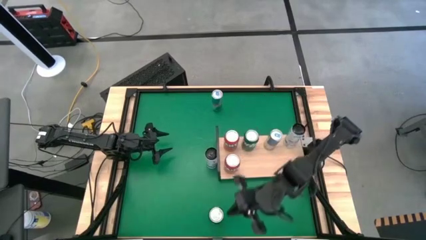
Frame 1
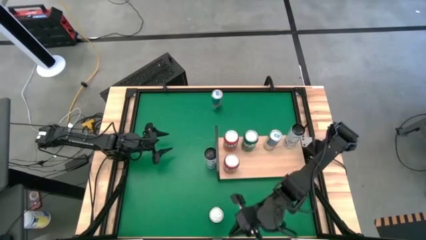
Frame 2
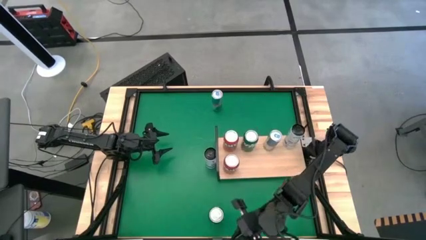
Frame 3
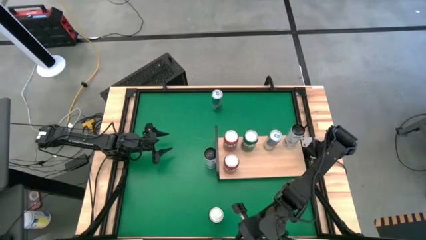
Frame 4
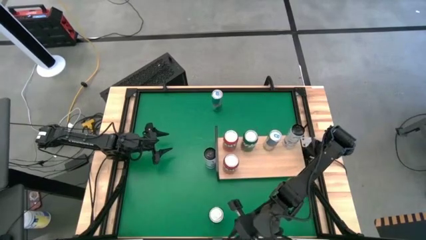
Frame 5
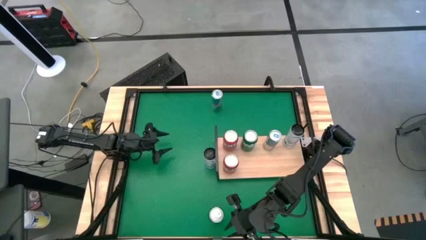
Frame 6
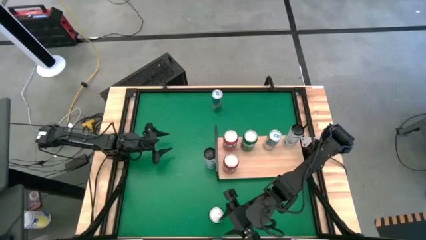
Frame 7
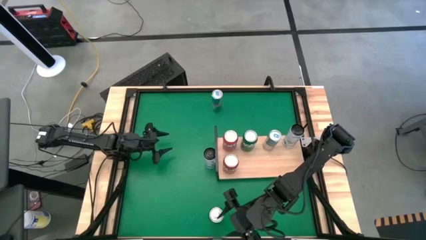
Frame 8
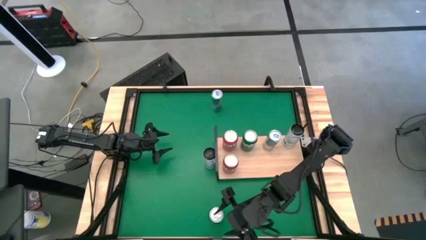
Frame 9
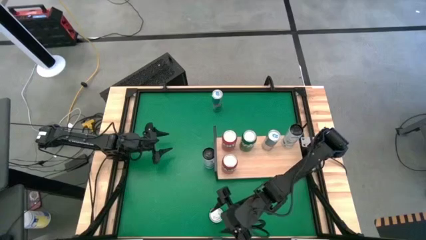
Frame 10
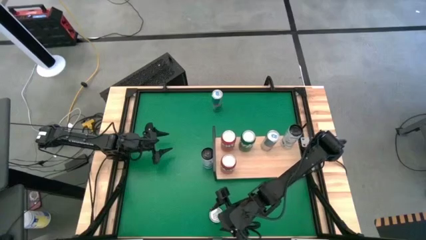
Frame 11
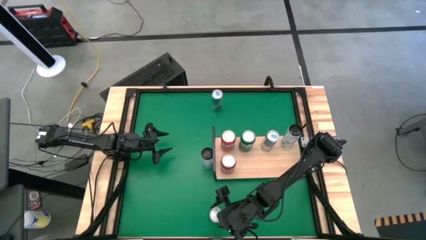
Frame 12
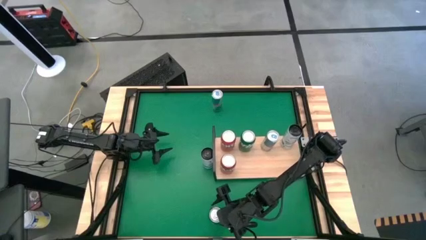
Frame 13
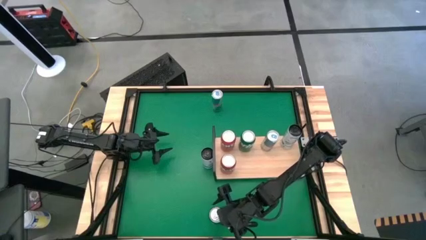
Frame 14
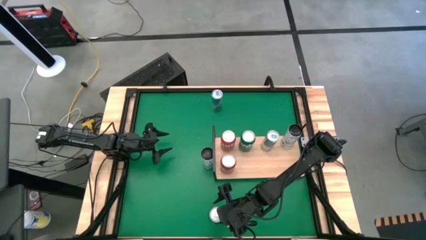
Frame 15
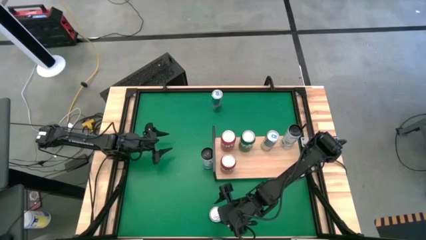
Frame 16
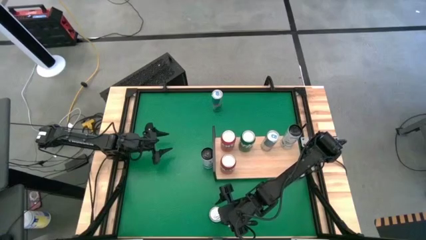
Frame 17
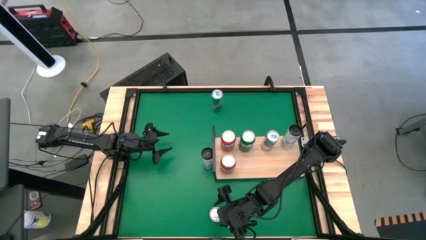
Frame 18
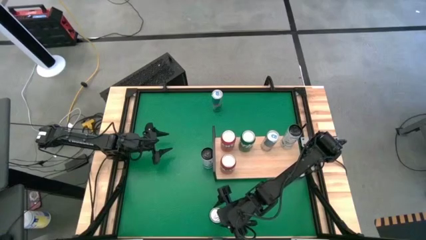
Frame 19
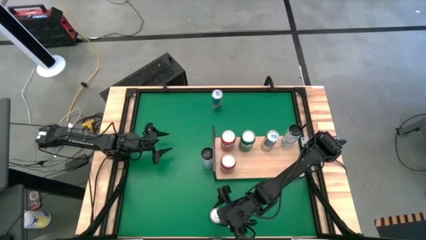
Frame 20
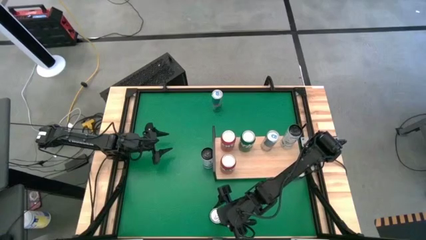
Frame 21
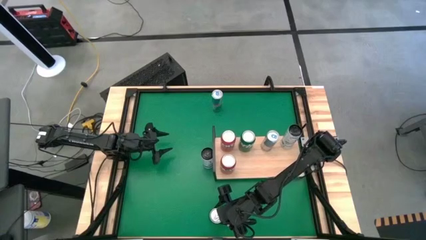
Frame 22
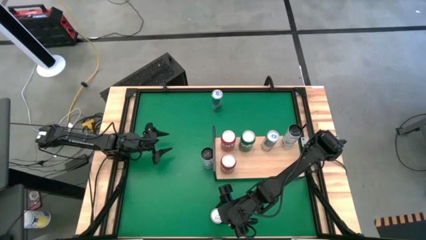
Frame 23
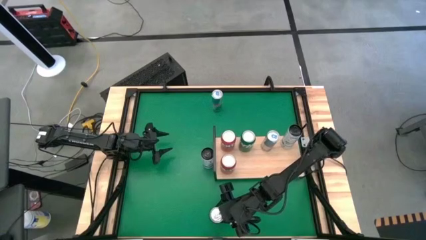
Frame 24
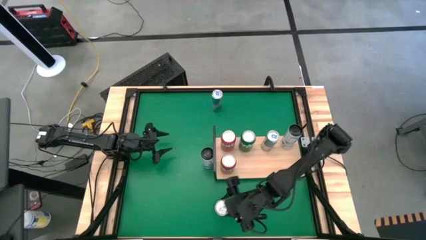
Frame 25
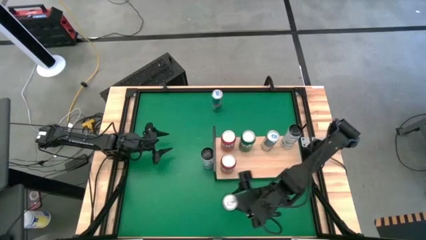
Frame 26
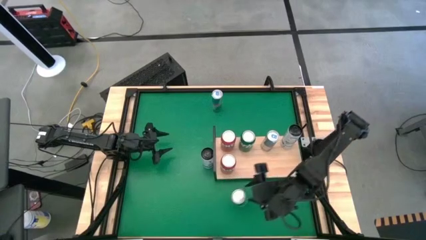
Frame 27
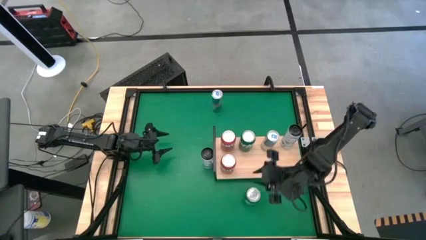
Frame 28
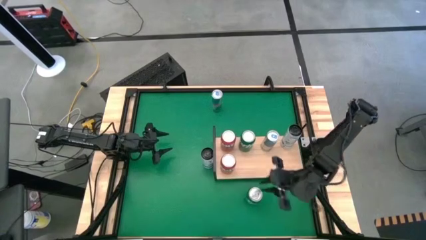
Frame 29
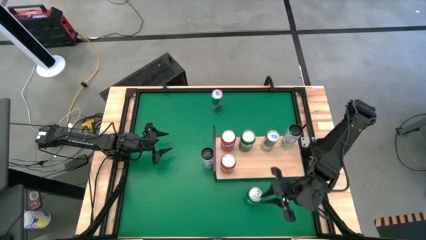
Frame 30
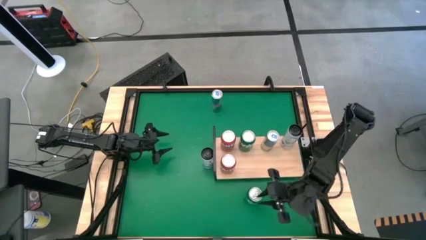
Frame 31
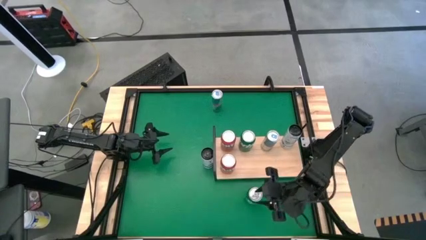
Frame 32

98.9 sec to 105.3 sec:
Task: Place canned beverage on shelf
Put the green soda can on the shelf

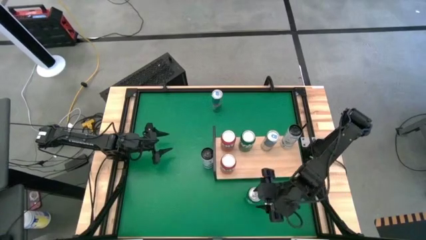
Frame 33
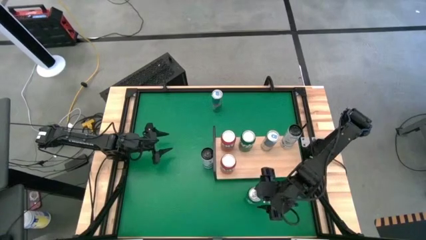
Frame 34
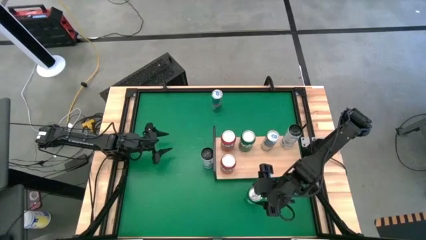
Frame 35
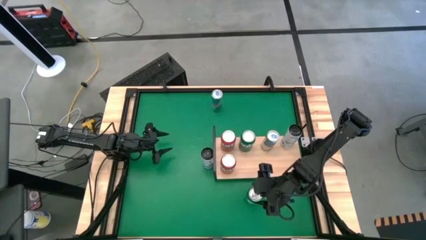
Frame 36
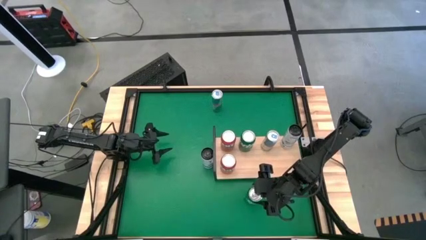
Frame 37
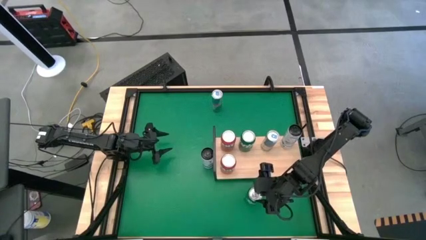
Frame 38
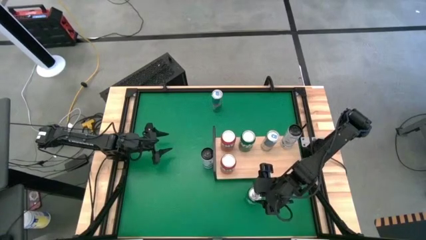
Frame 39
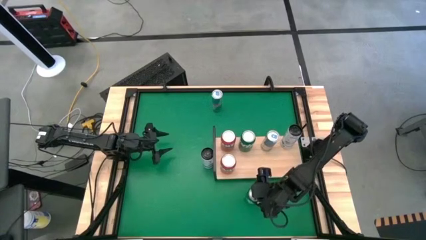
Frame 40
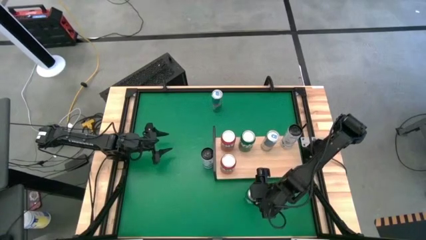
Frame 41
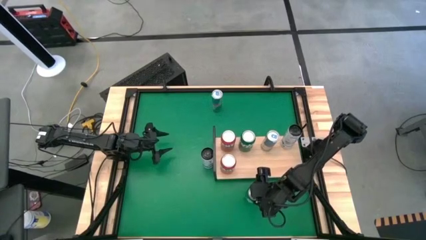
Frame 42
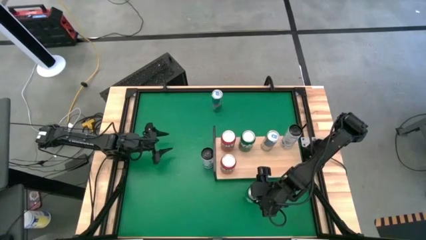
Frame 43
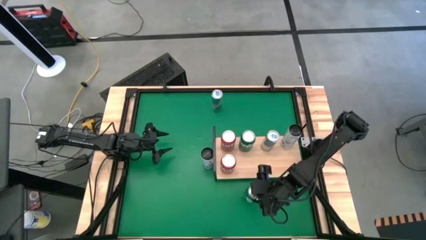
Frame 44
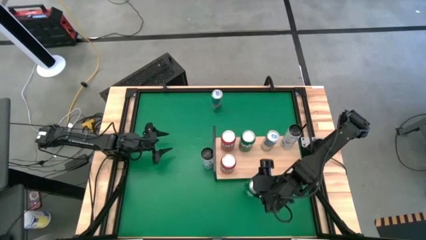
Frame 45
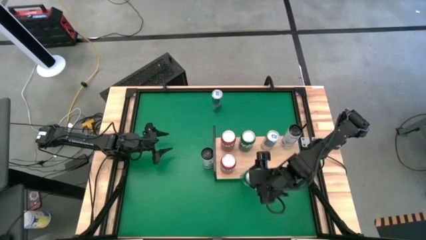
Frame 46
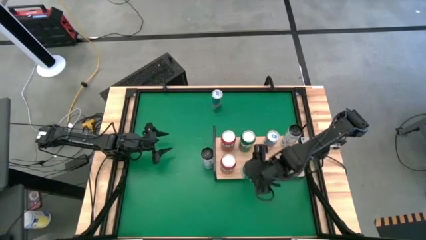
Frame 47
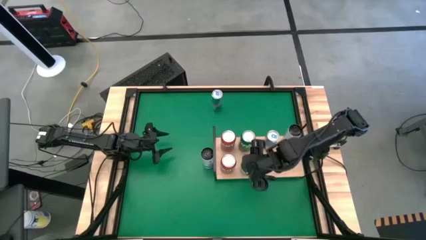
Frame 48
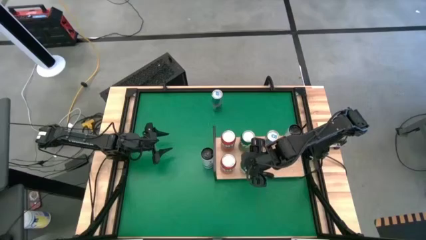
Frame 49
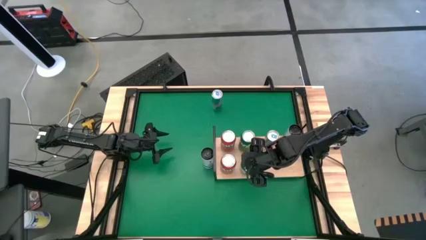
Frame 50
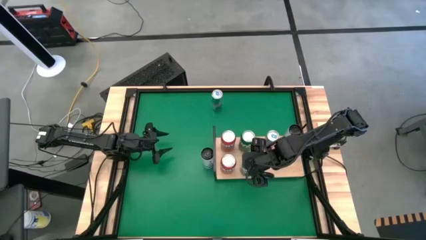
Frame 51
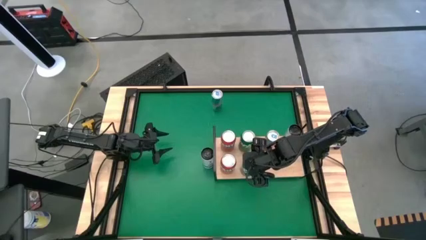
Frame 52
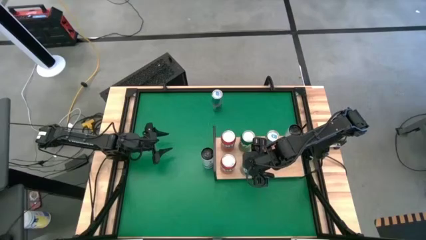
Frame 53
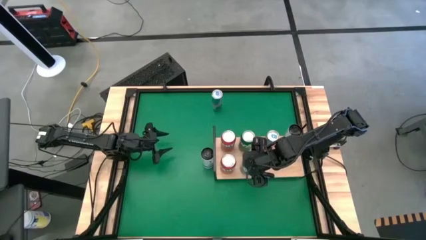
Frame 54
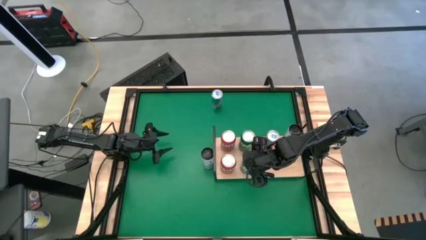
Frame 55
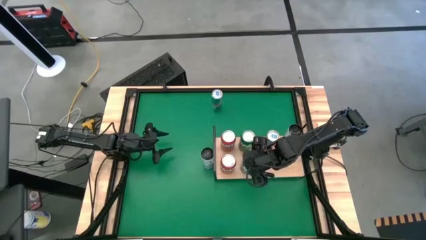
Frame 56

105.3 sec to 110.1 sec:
Put the green soda can on the shelf

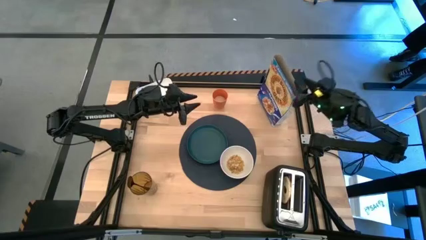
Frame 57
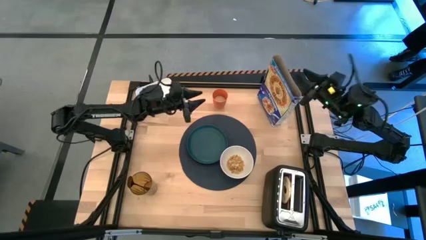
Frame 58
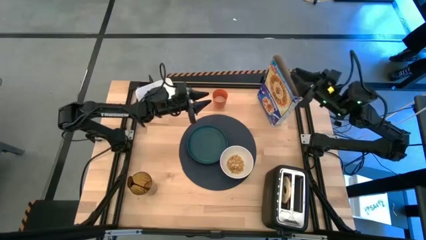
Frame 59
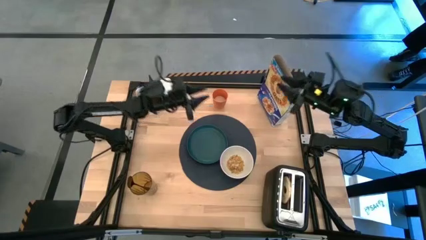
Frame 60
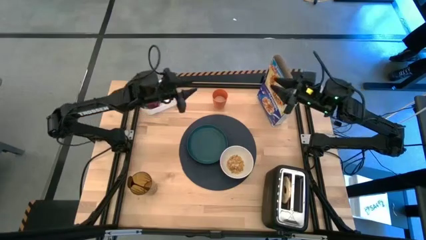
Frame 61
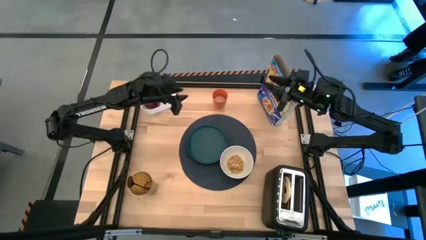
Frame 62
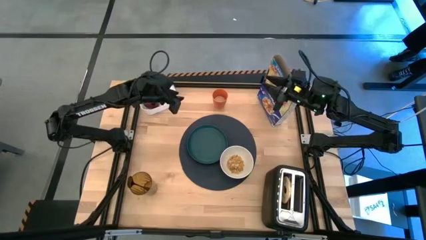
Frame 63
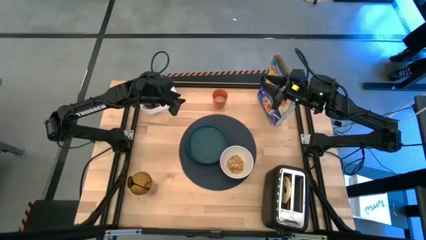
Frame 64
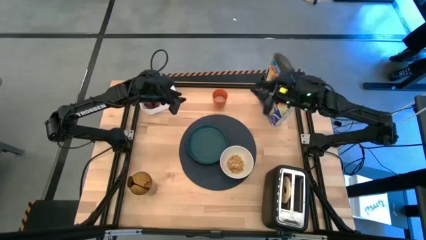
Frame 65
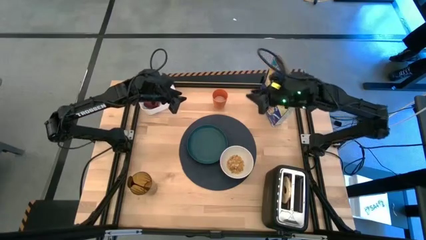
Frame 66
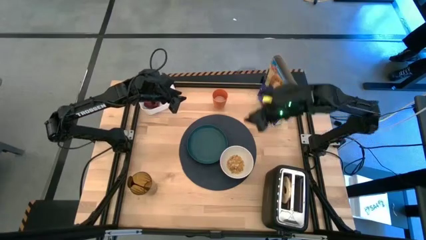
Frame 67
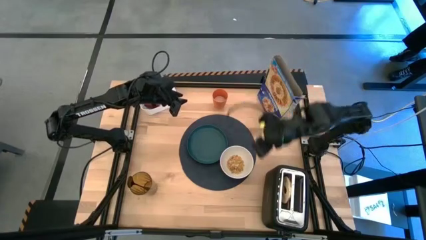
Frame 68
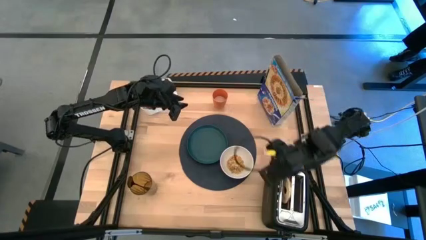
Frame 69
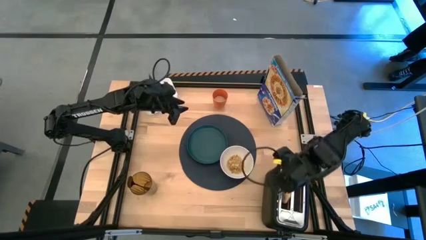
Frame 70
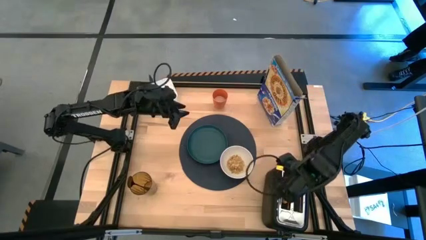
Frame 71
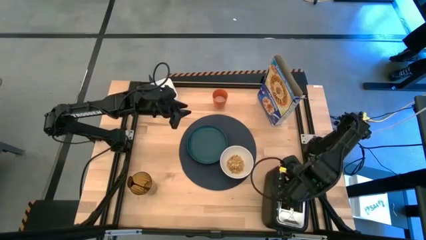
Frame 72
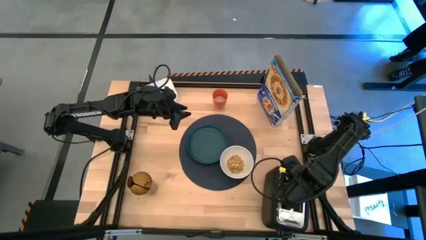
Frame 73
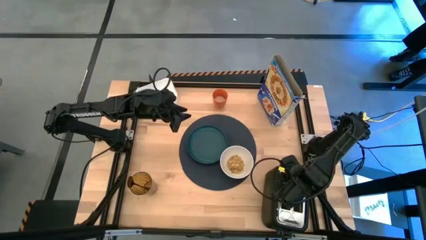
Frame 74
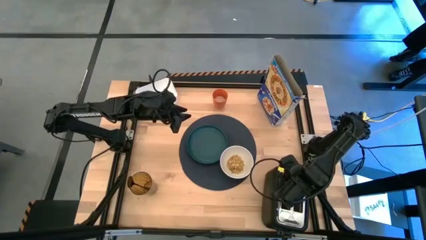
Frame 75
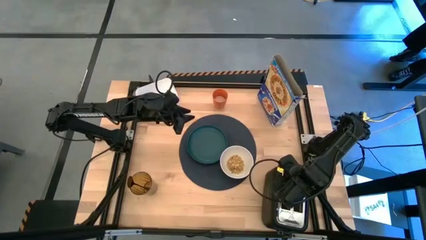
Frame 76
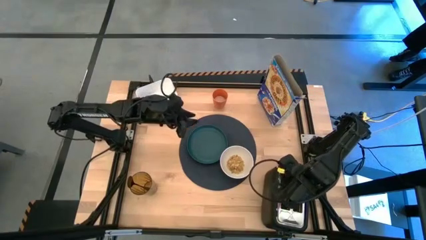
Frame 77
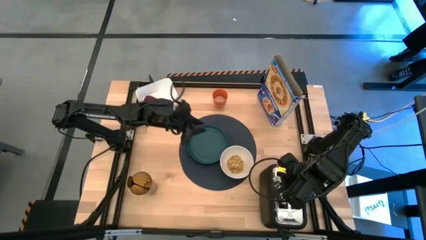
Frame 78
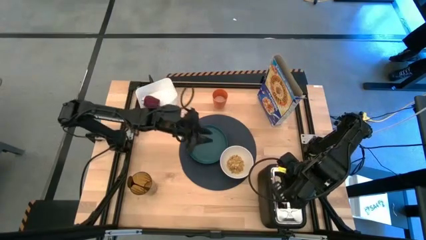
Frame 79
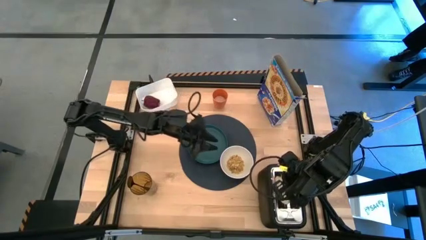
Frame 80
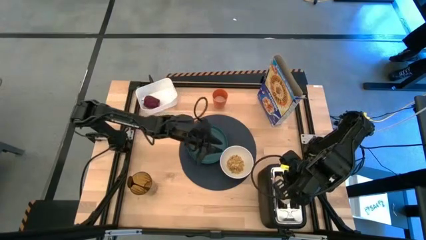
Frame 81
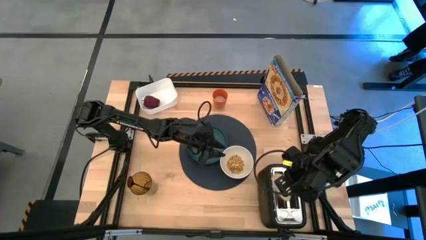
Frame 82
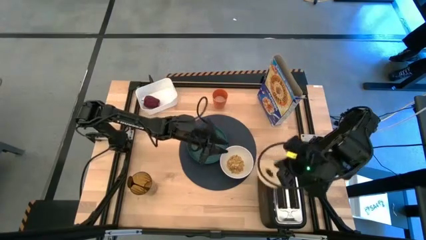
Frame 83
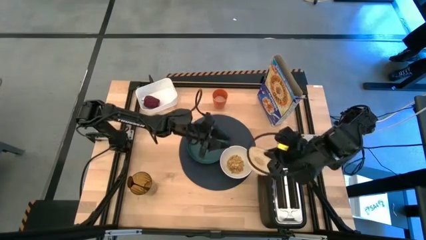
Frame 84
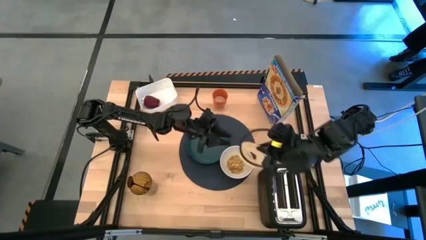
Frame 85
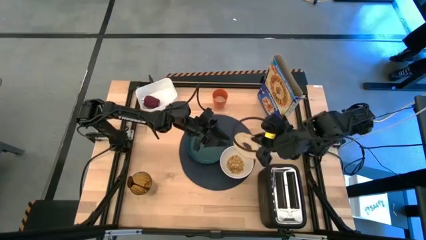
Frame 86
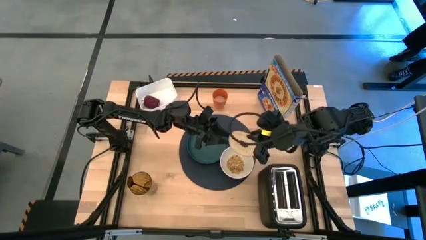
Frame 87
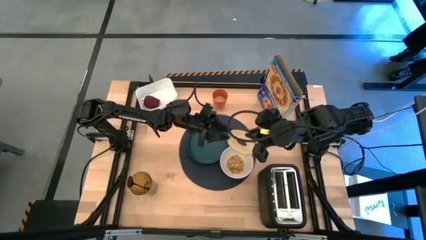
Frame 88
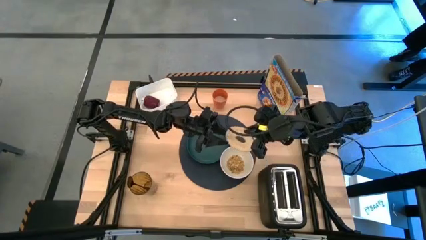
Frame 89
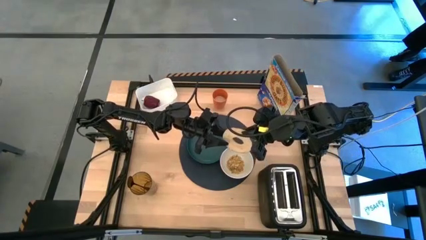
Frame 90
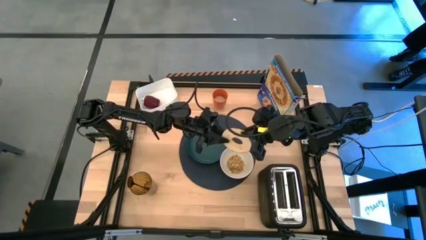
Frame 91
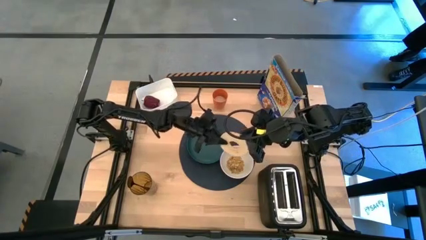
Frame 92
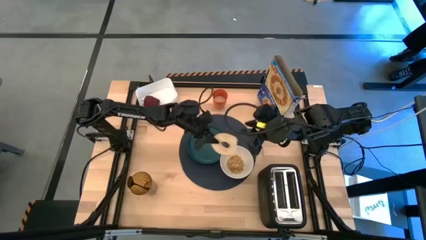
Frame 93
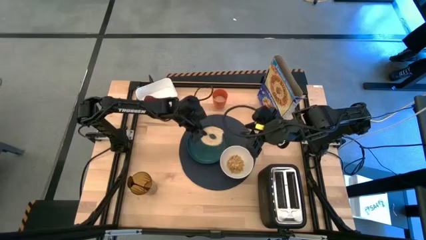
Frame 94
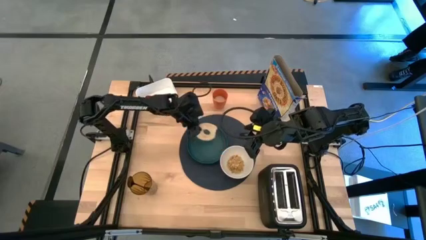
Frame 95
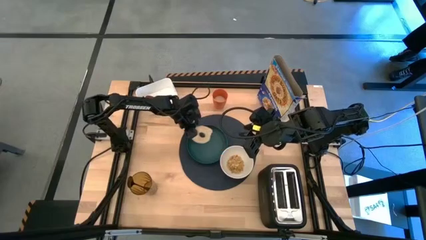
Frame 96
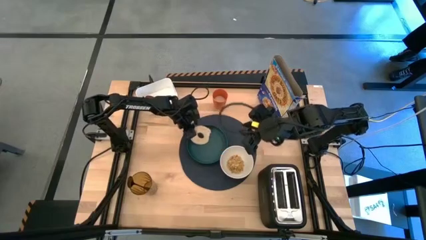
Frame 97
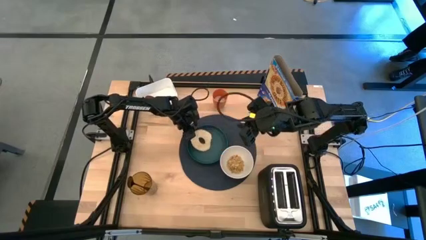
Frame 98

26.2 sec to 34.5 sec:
Task: Arrange a breakfast setting
Put the toasted bagel from the toasted oven into the green plate
